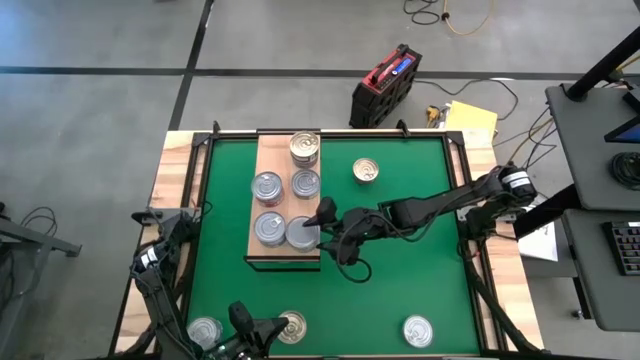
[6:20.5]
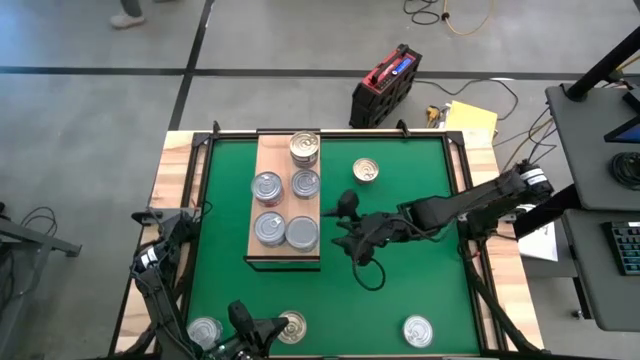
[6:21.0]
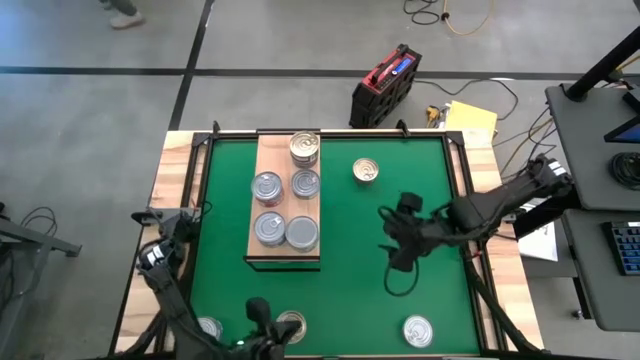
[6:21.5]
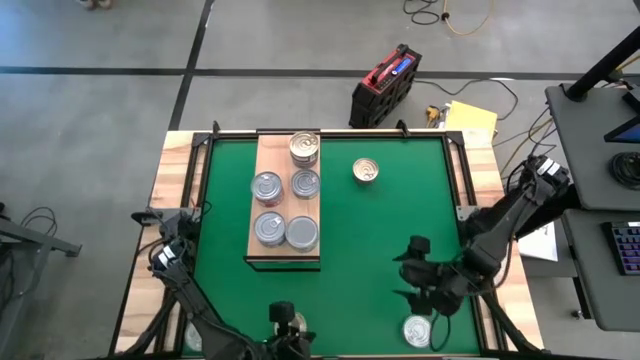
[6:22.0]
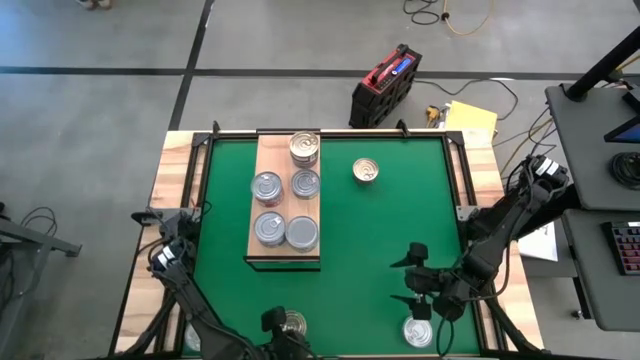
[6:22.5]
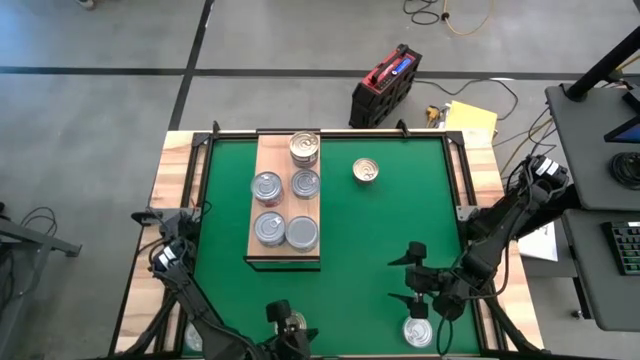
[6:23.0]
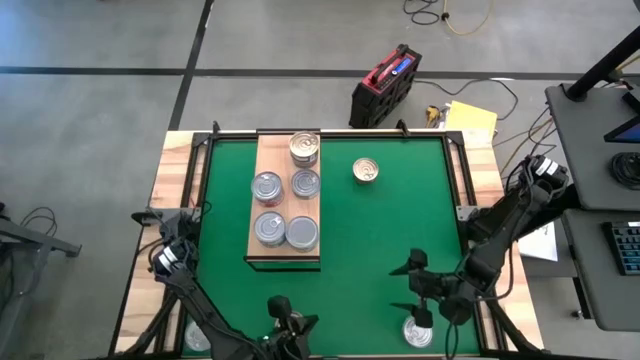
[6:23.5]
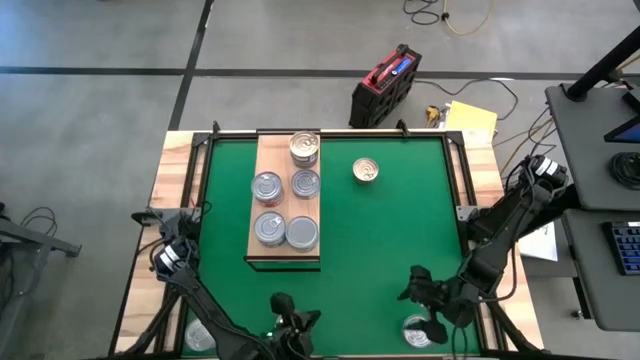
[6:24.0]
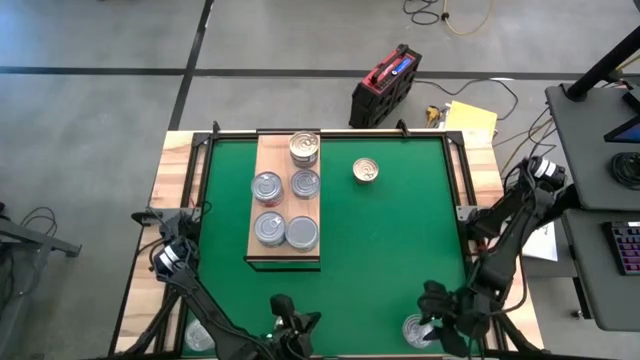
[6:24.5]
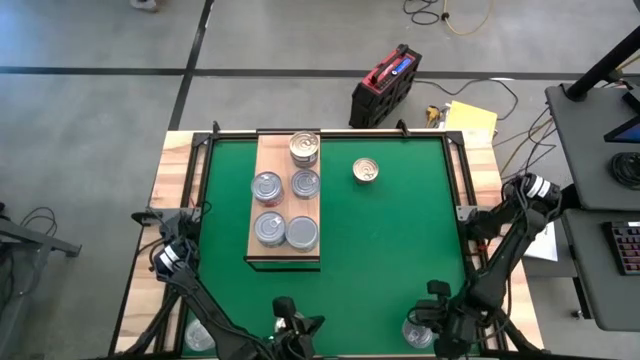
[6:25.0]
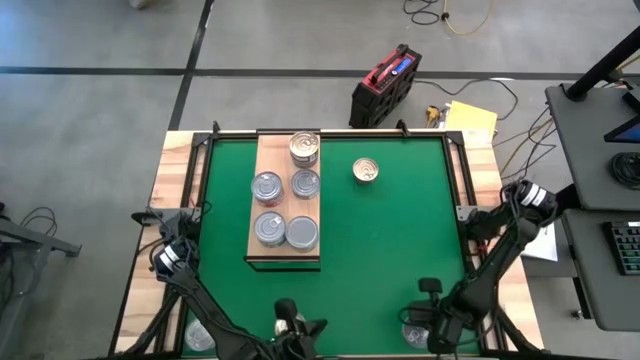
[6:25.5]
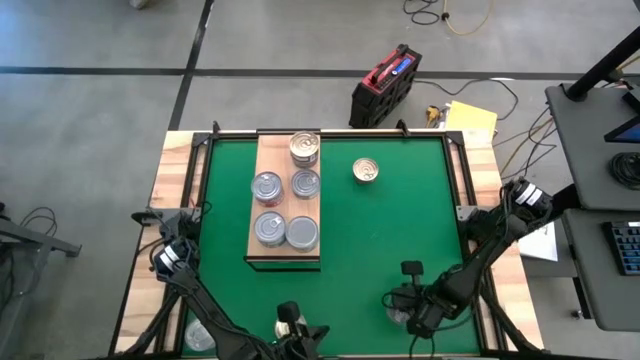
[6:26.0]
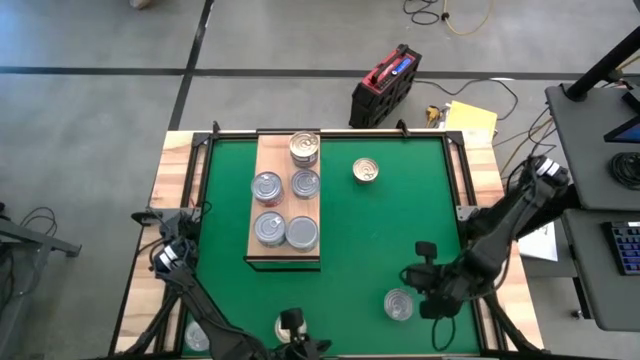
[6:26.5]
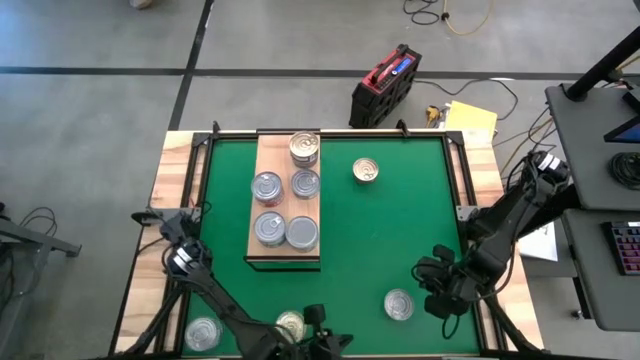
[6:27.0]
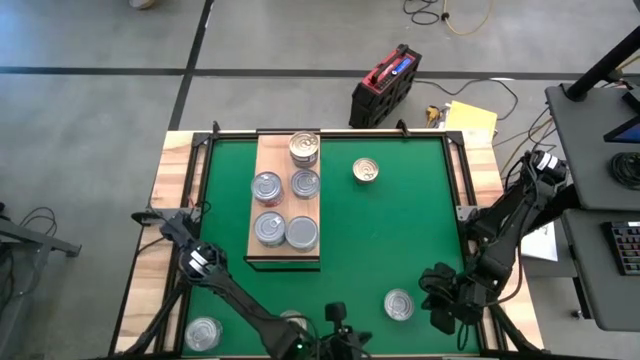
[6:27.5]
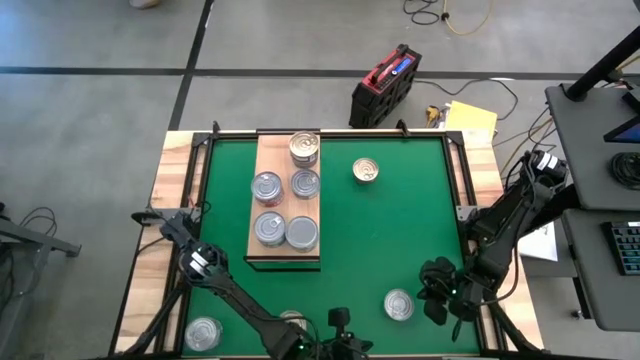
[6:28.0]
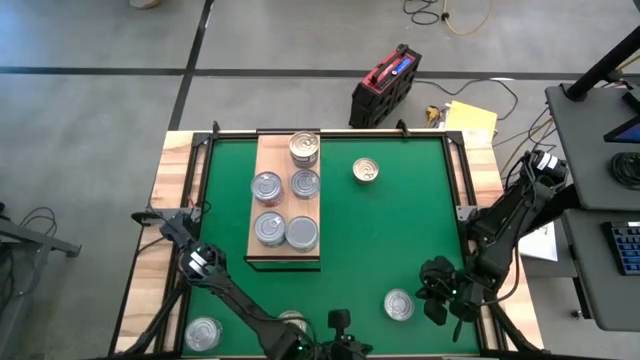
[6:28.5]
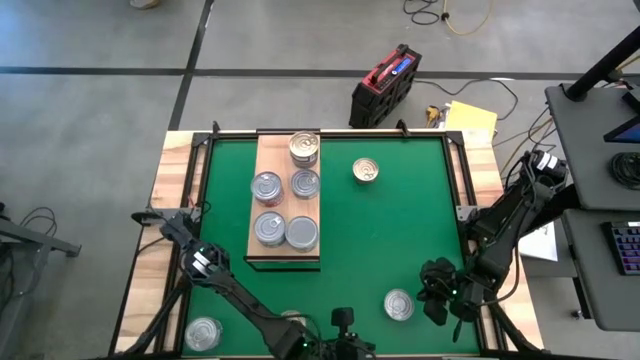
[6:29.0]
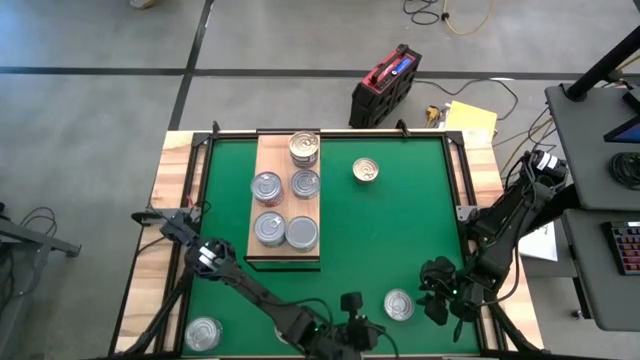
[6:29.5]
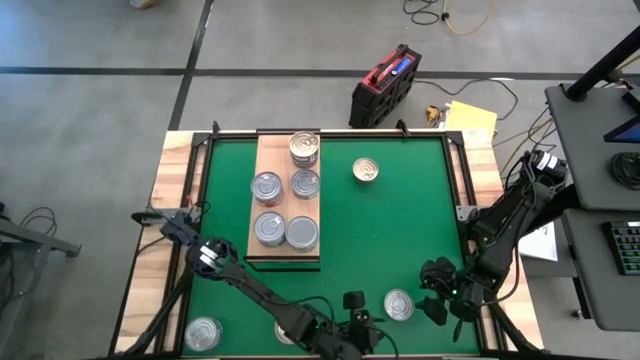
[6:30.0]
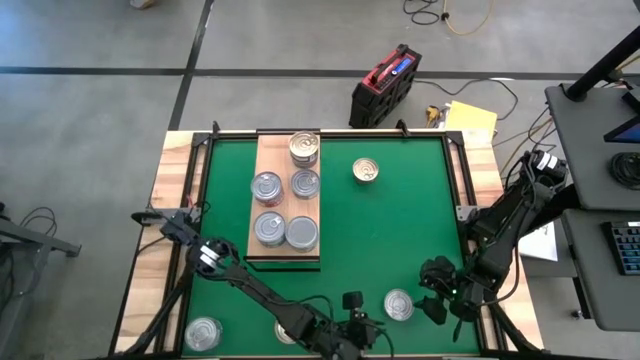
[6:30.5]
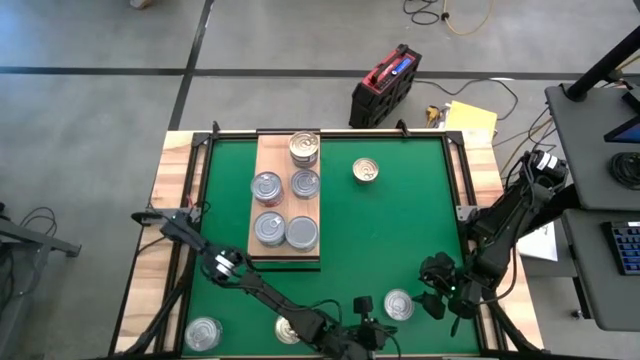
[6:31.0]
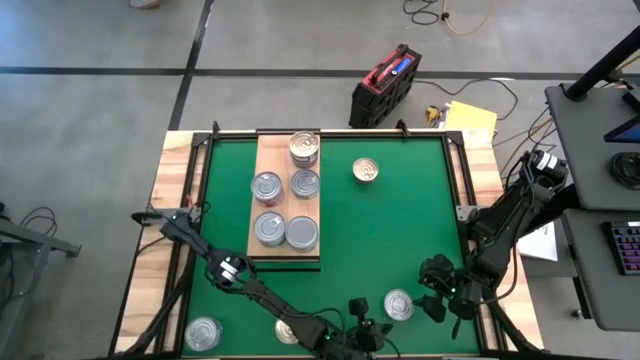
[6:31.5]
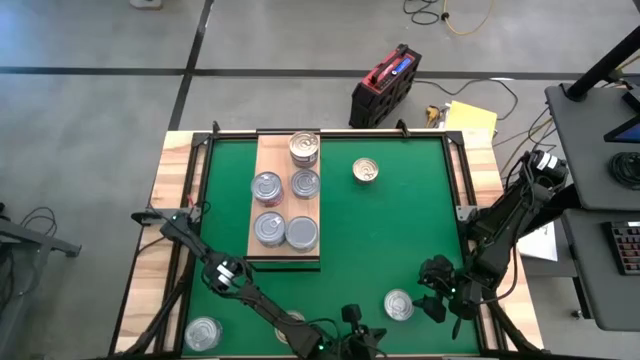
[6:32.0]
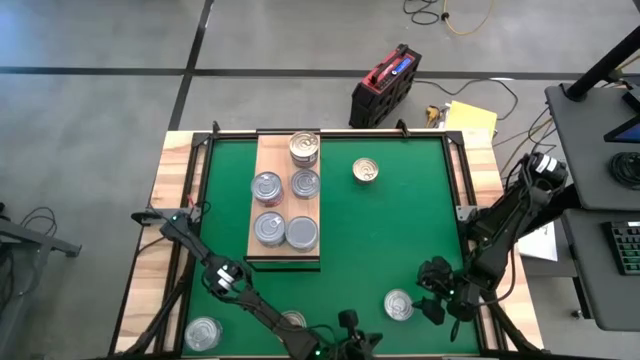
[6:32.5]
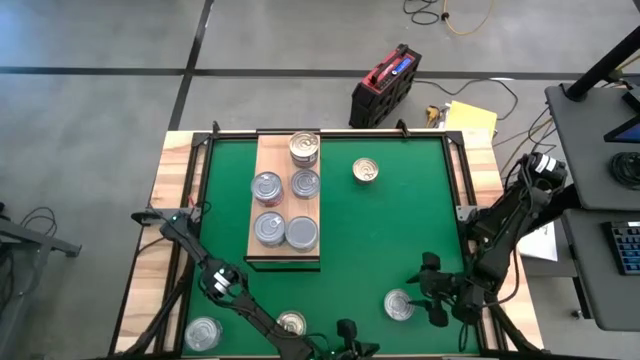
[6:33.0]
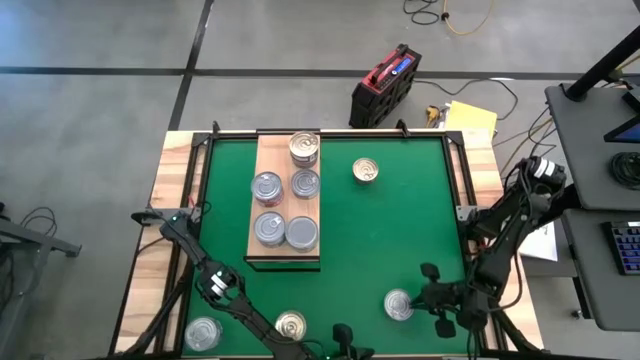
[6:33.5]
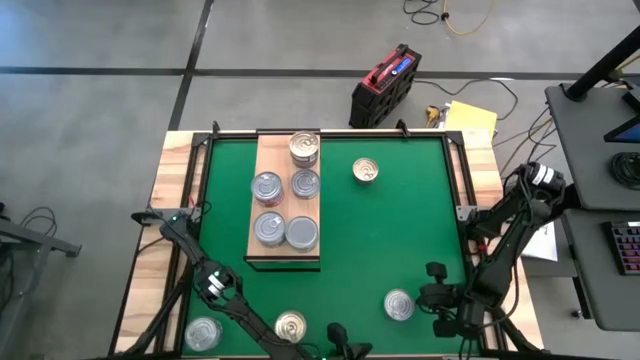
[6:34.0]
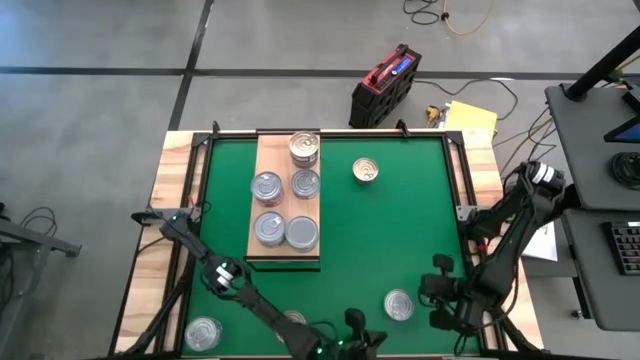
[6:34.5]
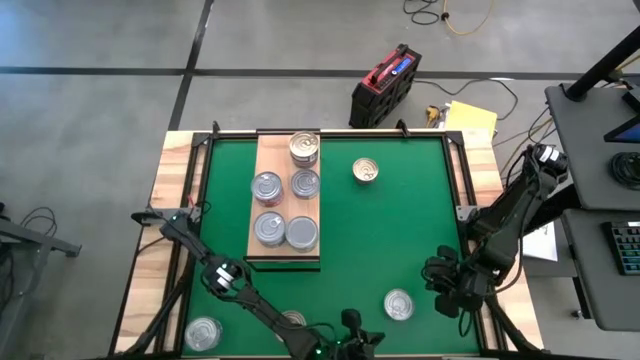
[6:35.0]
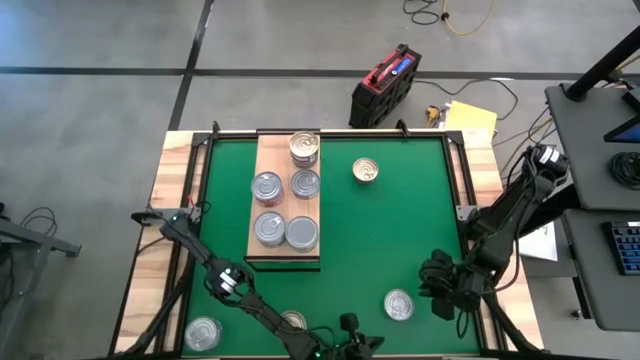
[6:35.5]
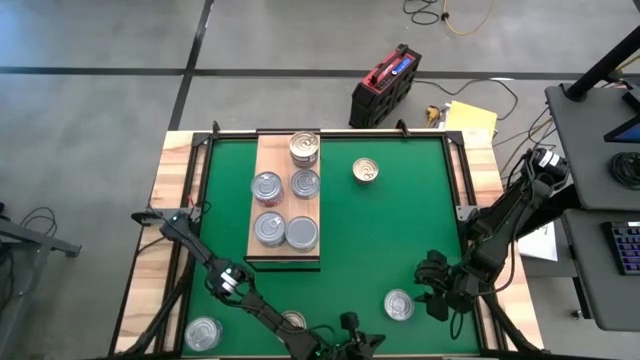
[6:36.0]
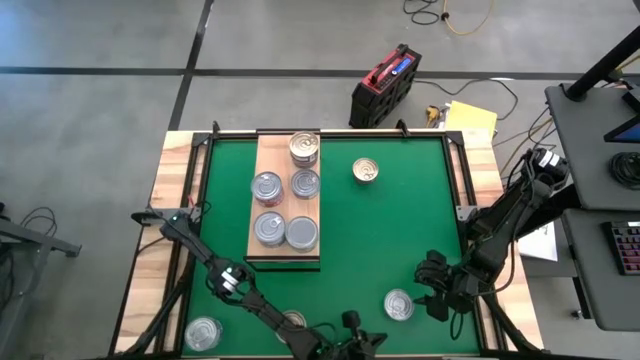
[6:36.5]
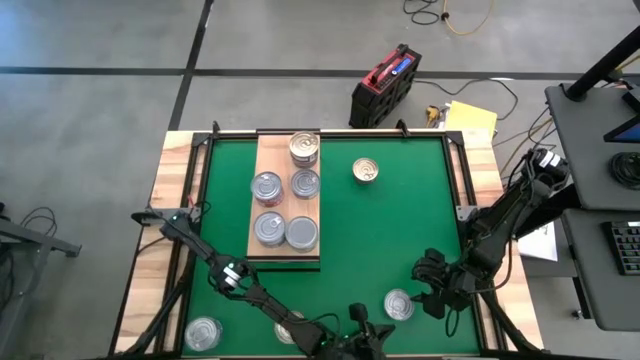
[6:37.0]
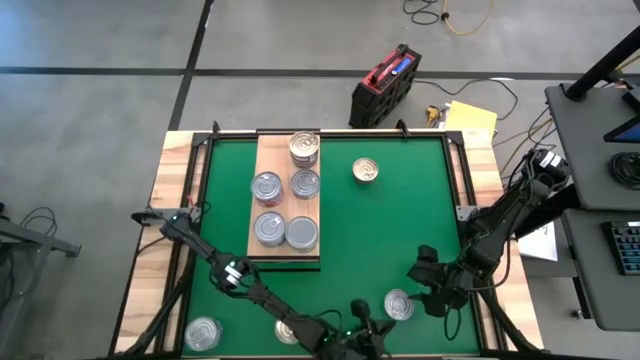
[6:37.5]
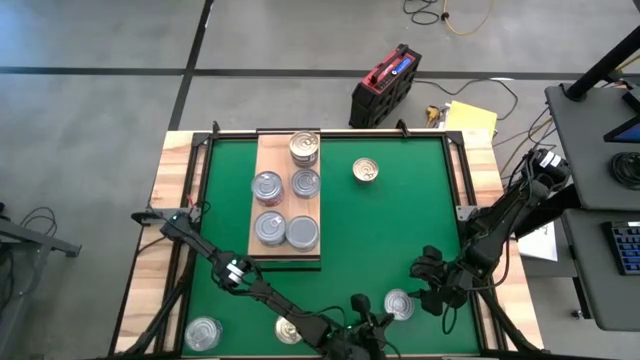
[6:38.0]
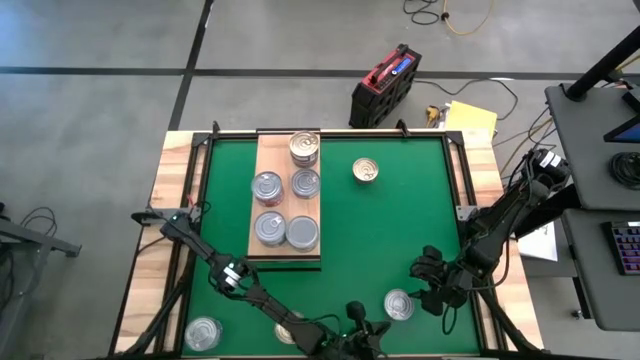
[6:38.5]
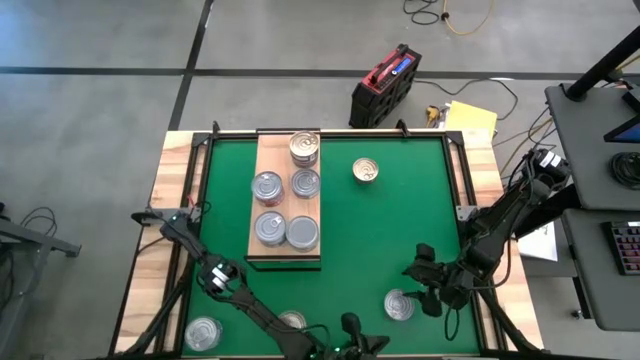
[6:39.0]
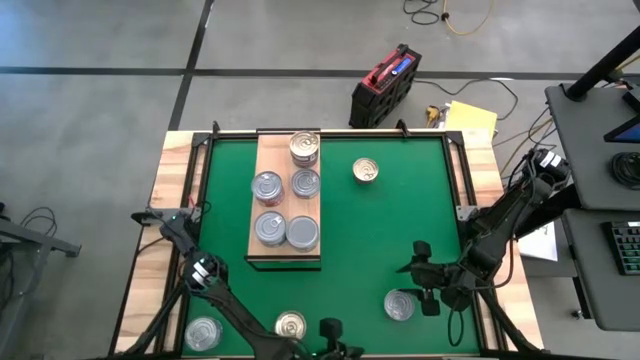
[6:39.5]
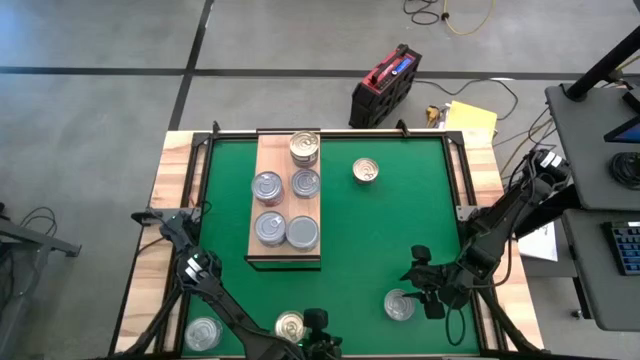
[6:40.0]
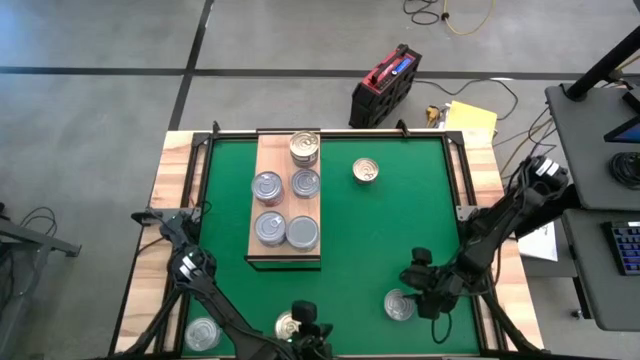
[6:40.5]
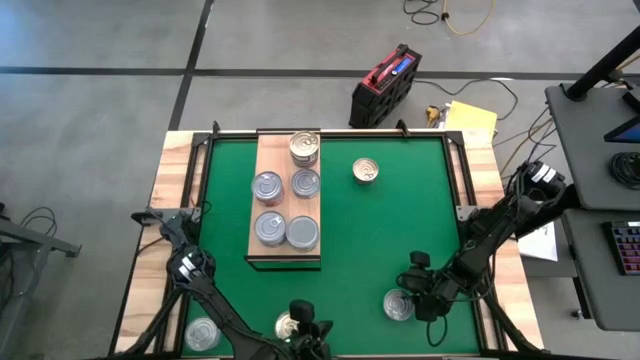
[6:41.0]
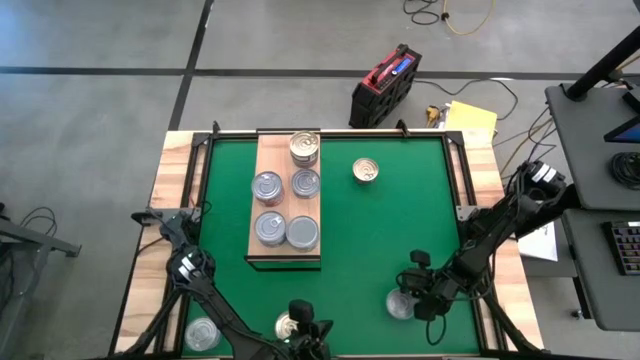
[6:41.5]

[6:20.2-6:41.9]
Task: Stack canned seafood by type on shelf
Put the yellow and blue tuna can on the shelf

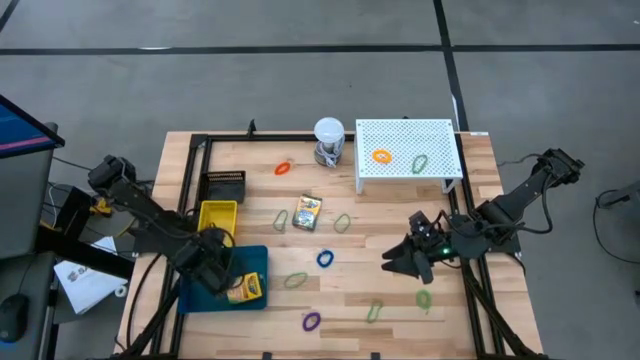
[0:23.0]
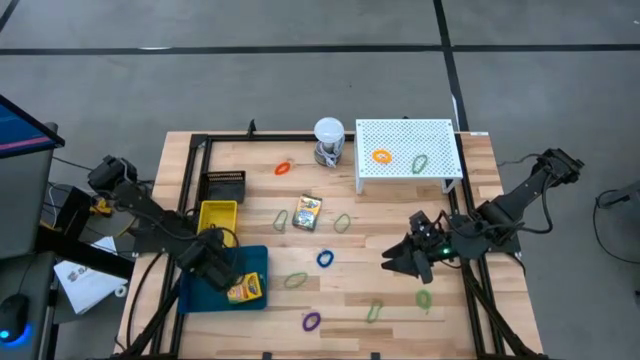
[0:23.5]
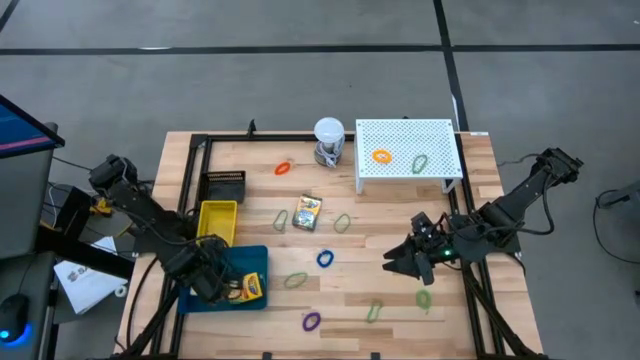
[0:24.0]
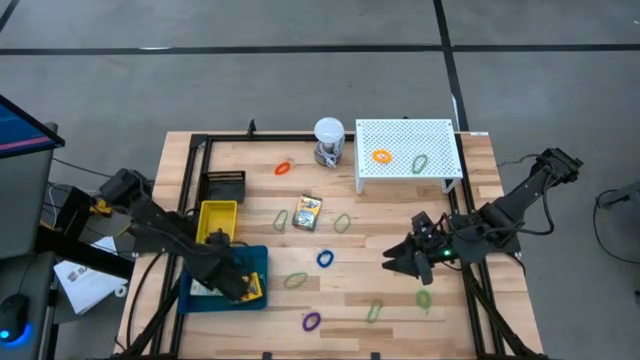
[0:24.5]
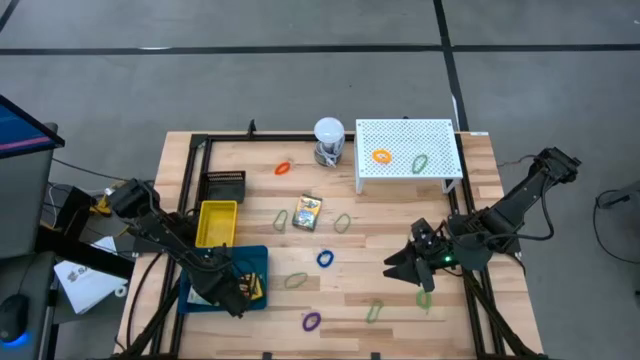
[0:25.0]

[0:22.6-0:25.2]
Task: Pick & Place Office Desk Supplies
Adjust the left crayon box in the blue bin
